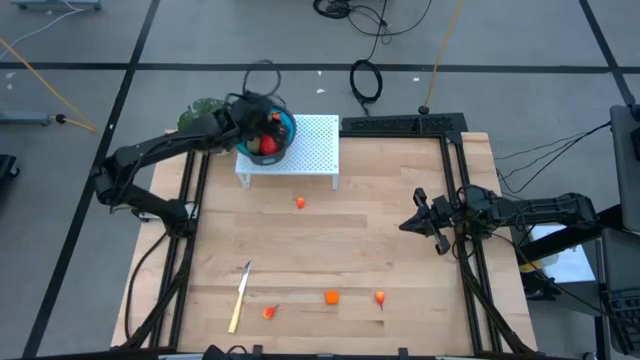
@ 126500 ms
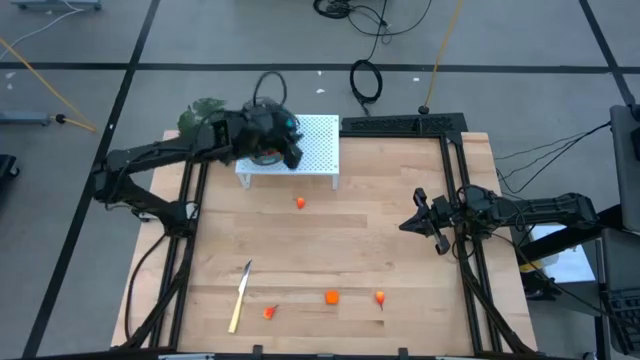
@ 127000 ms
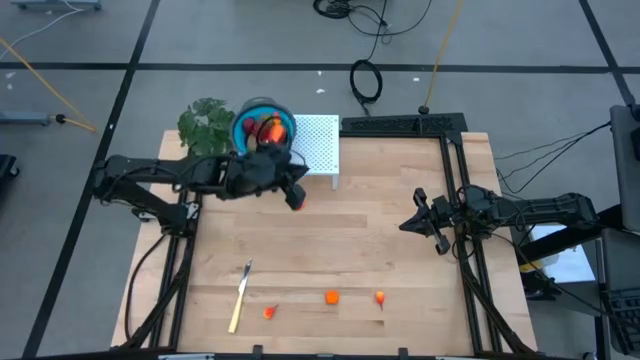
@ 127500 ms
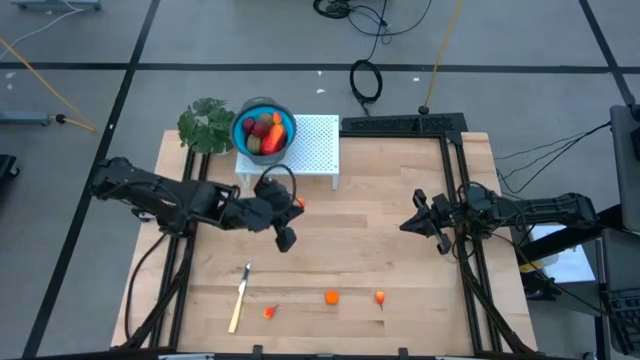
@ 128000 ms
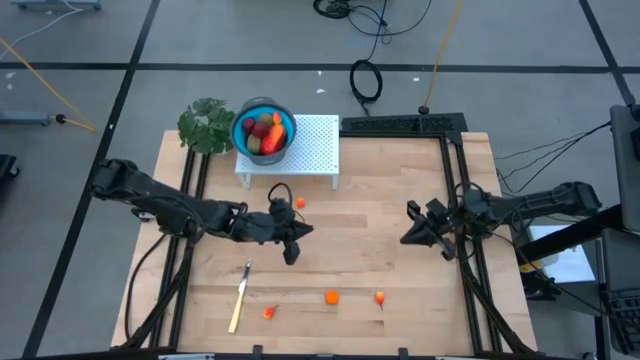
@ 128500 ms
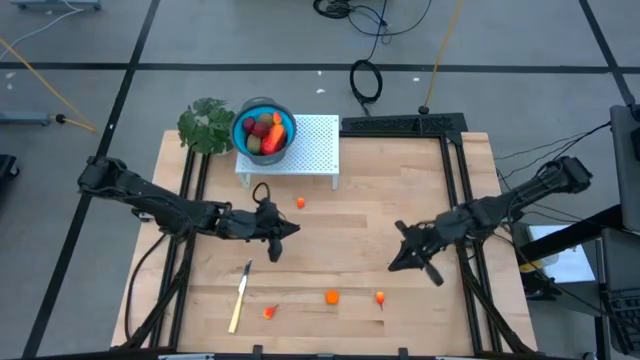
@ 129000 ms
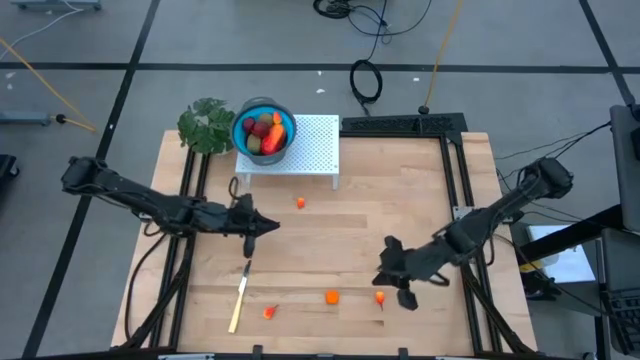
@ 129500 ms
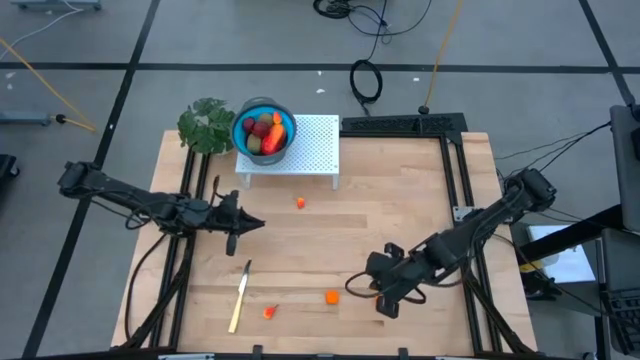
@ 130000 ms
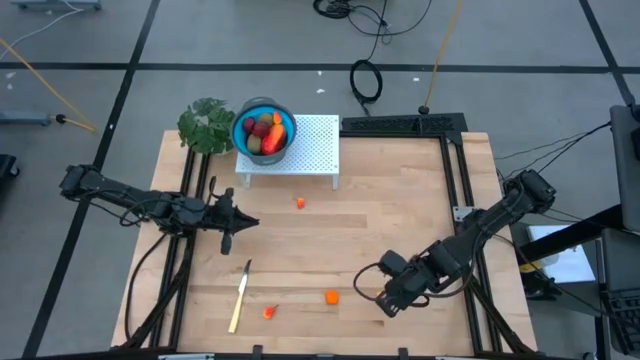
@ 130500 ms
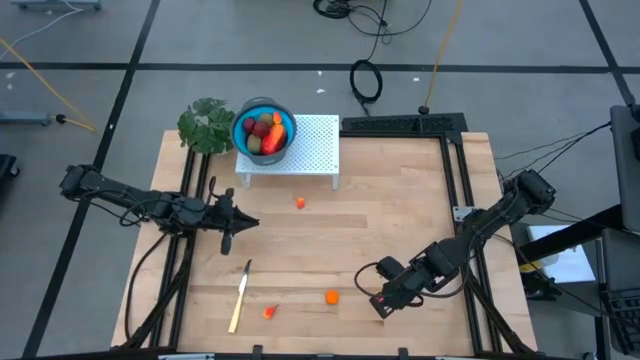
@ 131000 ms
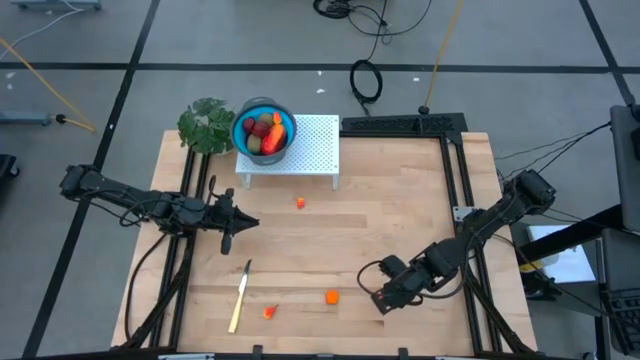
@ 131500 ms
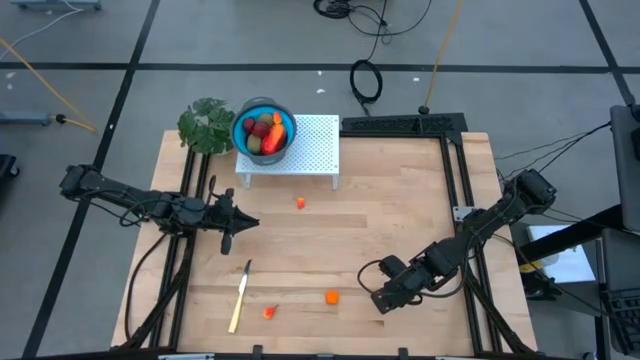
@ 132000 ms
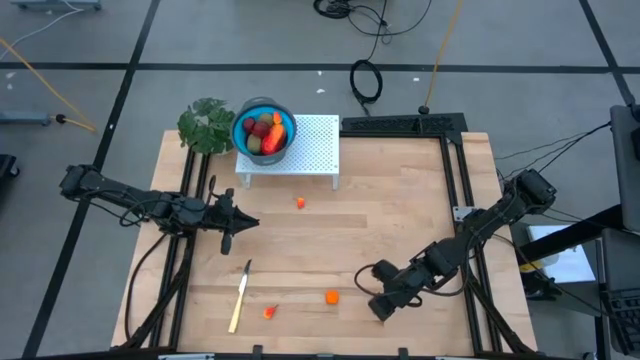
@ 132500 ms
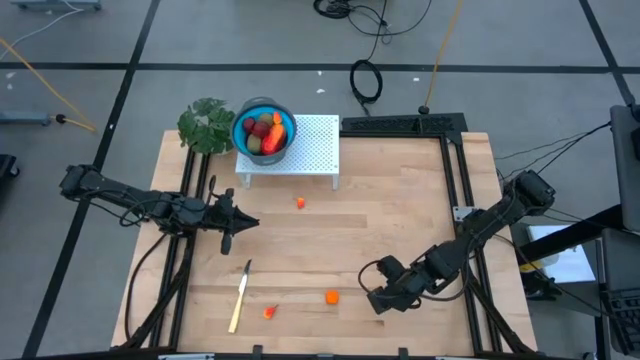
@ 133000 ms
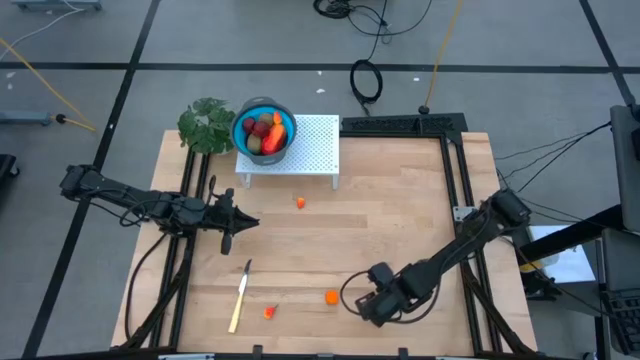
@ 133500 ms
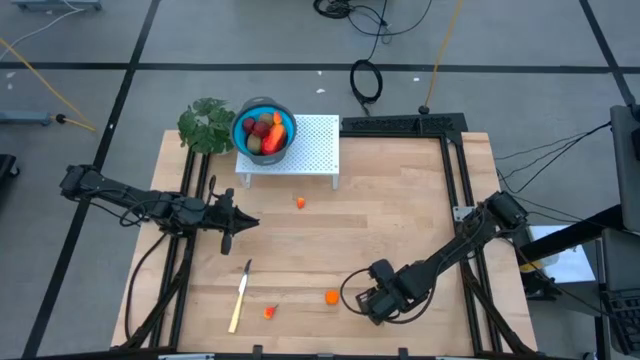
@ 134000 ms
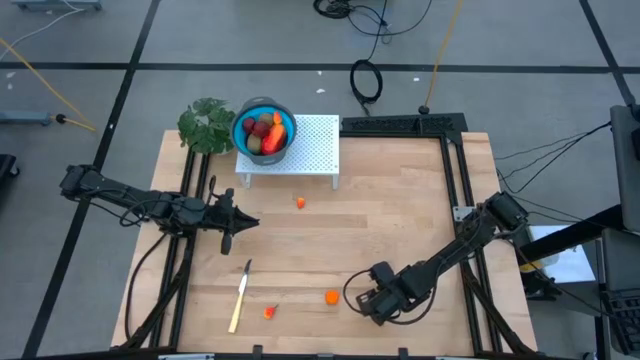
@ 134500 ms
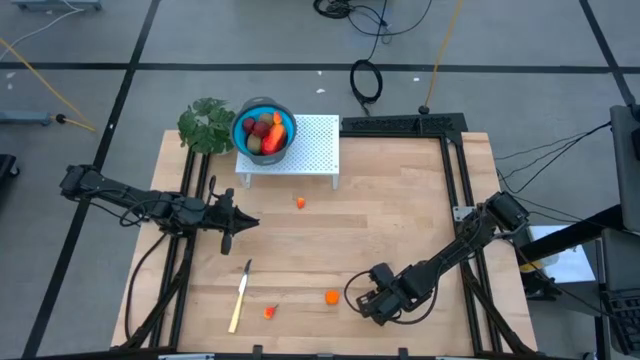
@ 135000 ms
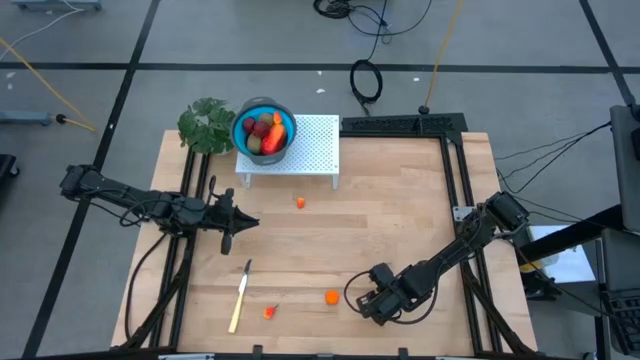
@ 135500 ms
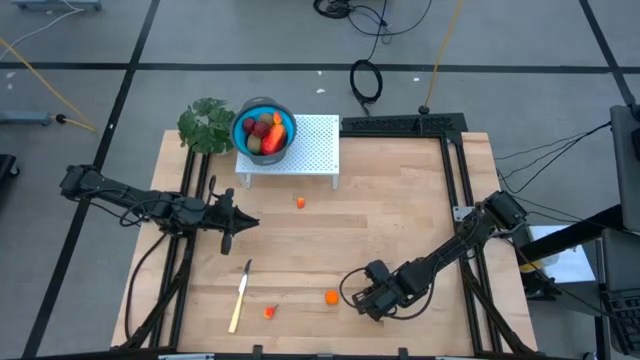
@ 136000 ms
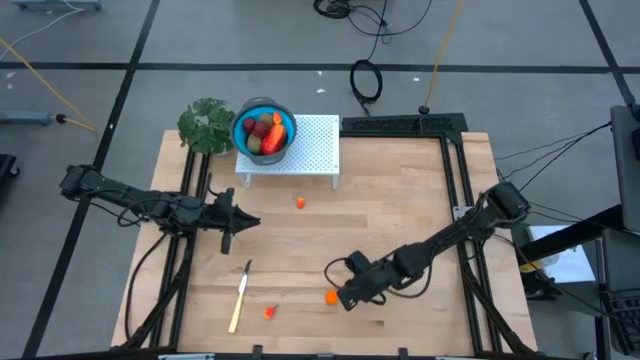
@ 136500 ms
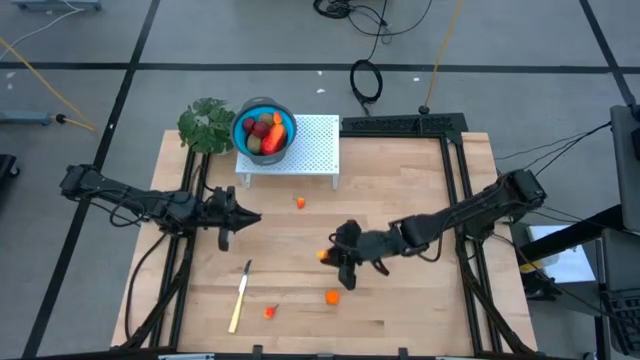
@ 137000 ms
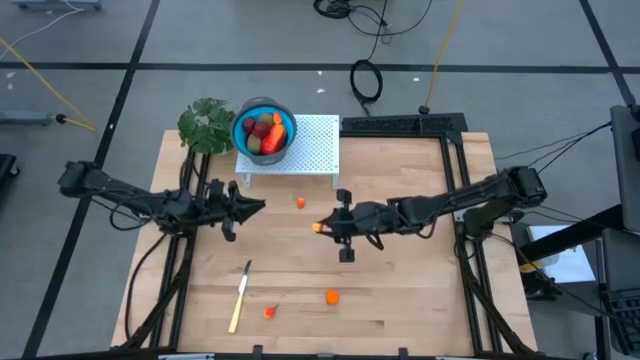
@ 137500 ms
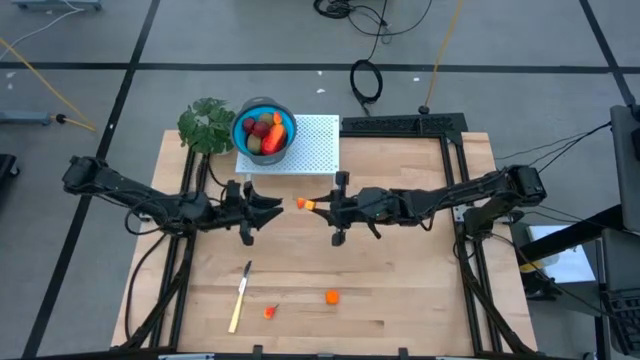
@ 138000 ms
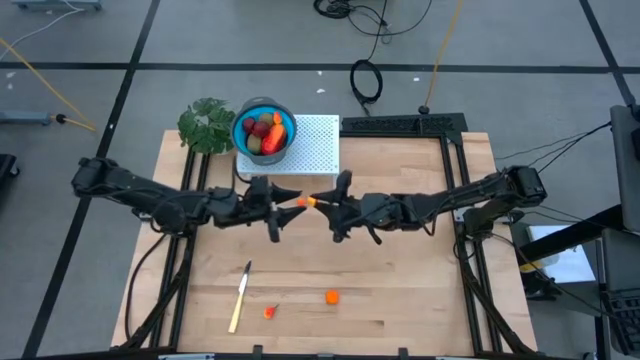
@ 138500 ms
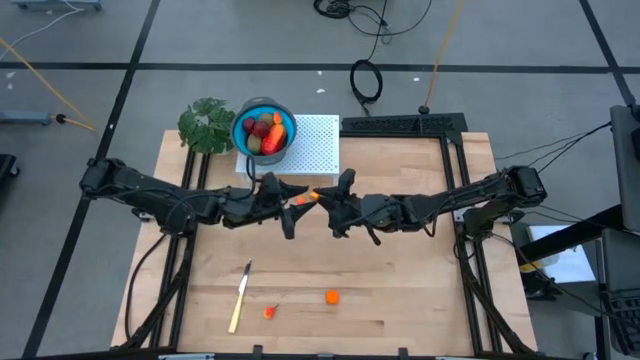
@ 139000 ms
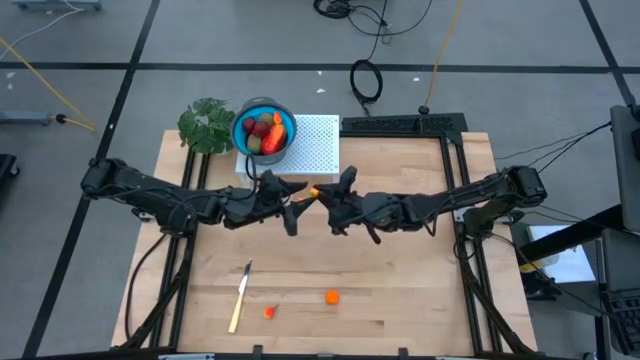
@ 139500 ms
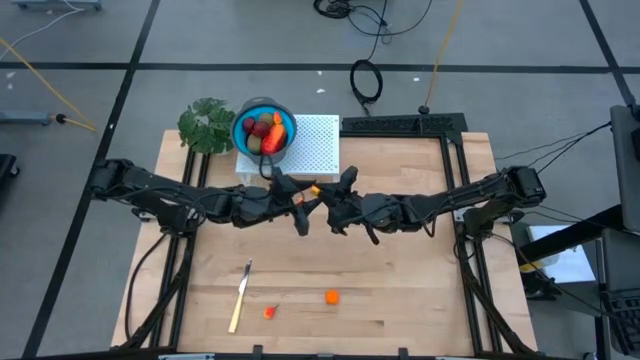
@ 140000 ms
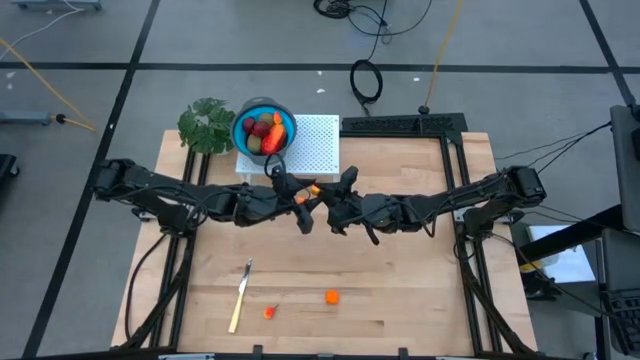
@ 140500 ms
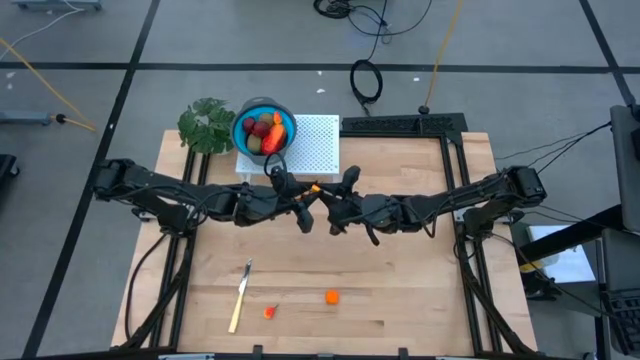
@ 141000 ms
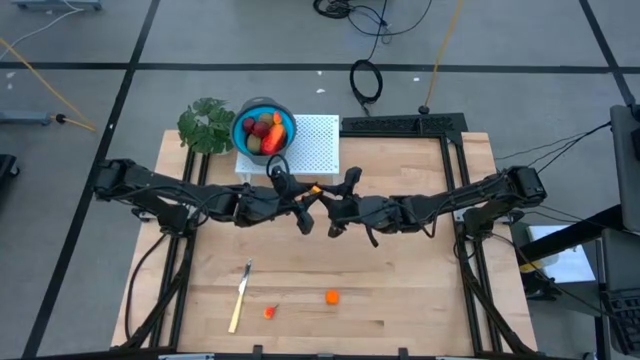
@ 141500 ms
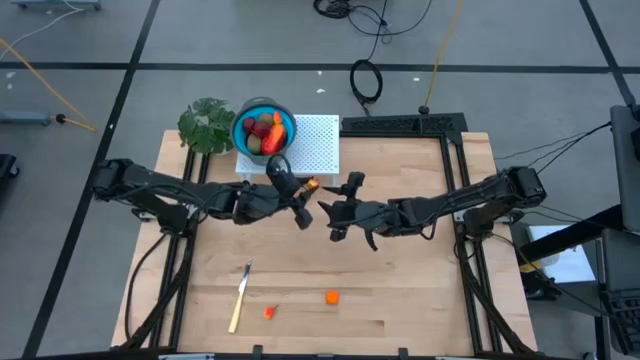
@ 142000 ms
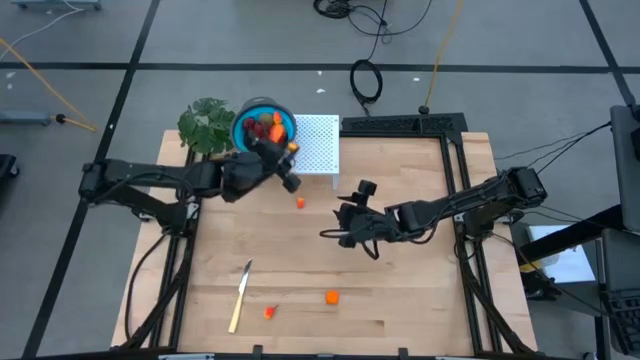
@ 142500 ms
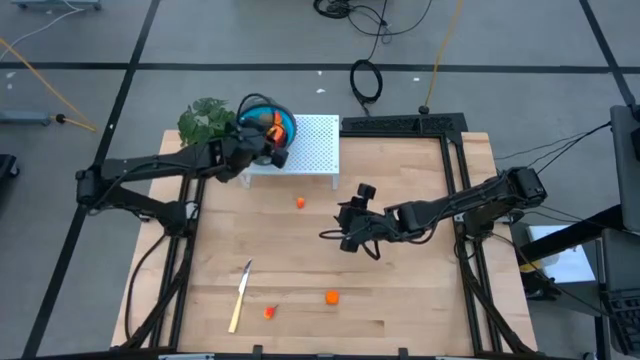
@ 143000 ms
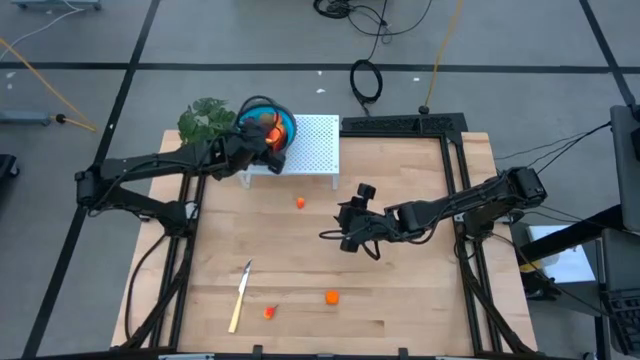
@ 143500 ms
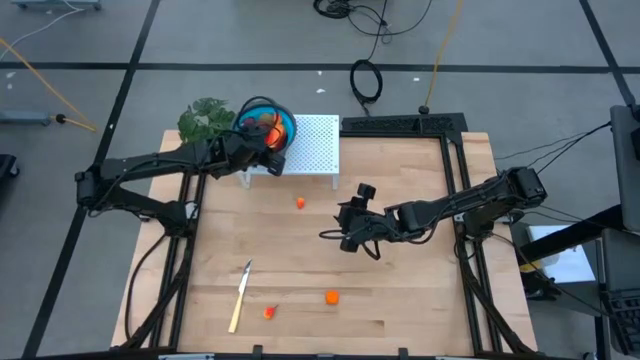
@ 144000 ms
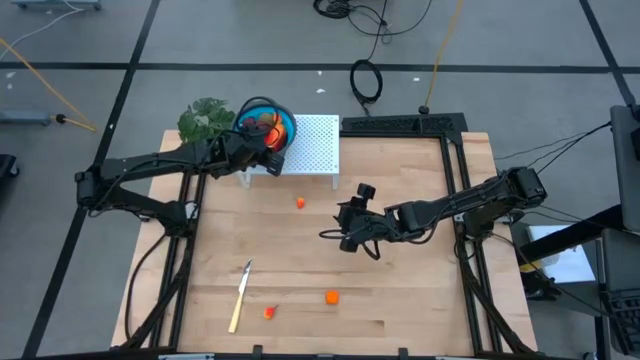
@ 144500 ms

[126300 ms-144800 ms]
Task: Pick & Place Fruit
Put the bottom right peach into the blue strainer bowl on the shelf on the shelf

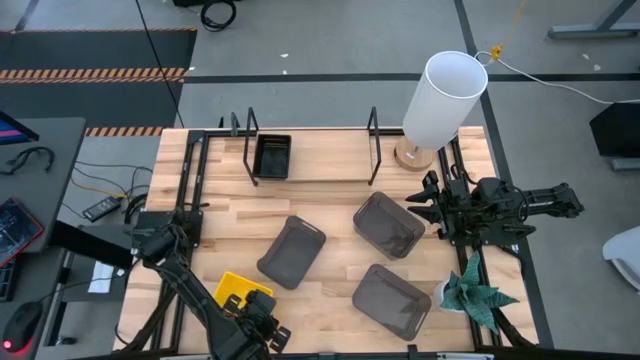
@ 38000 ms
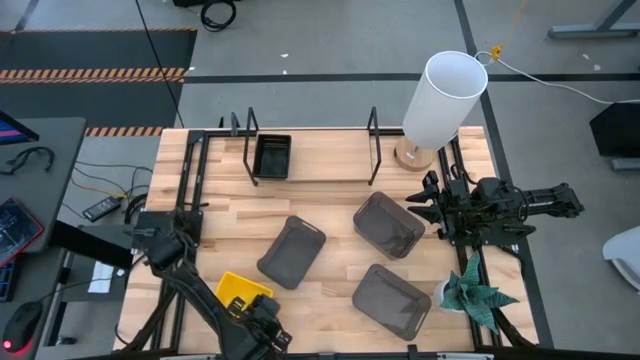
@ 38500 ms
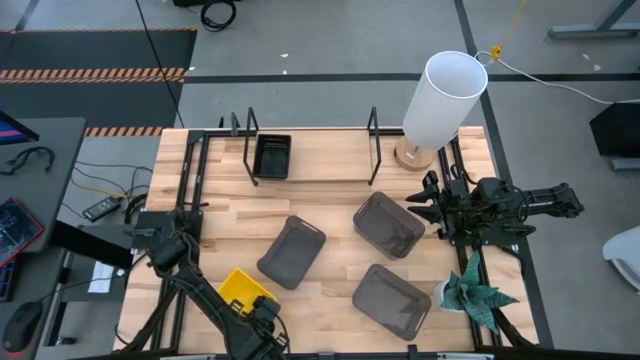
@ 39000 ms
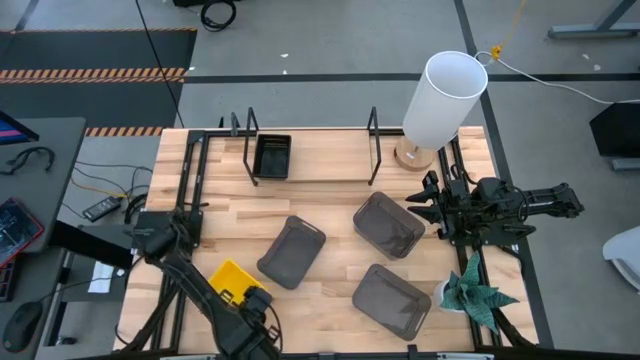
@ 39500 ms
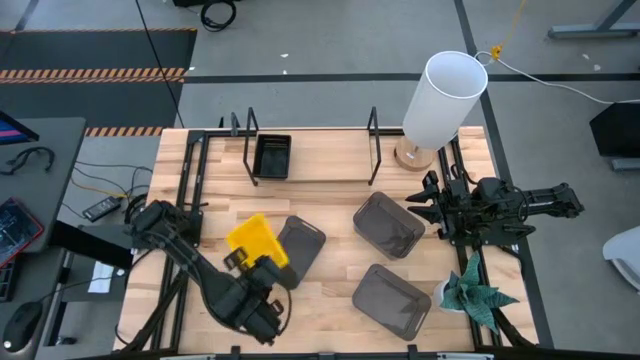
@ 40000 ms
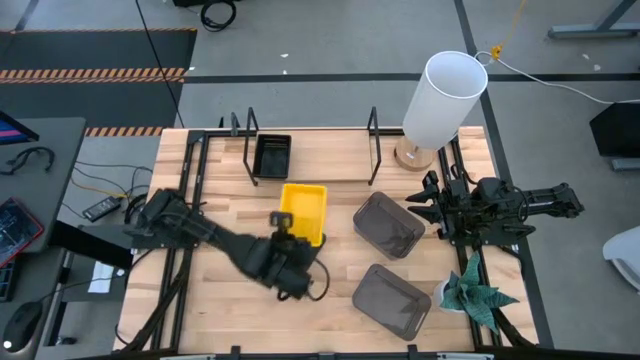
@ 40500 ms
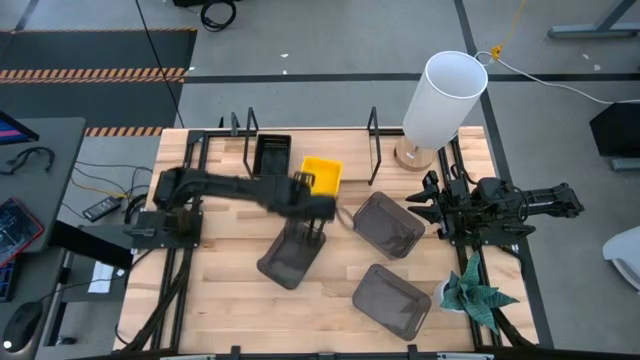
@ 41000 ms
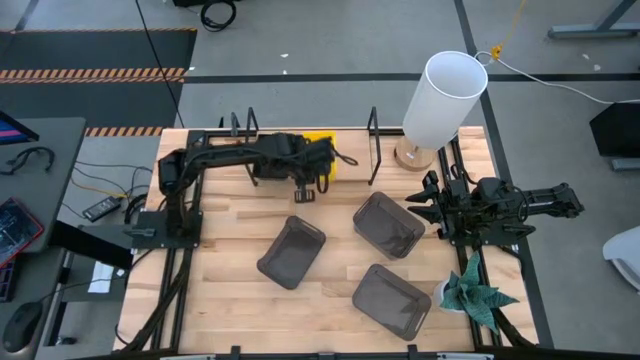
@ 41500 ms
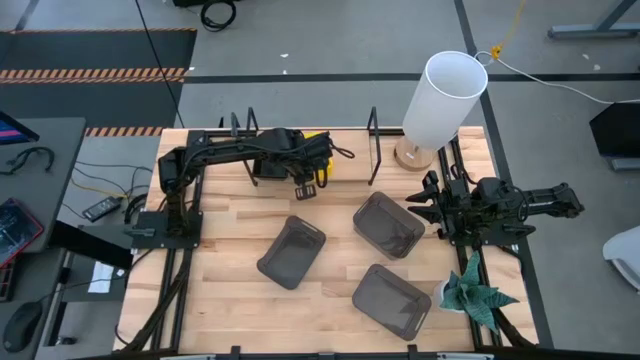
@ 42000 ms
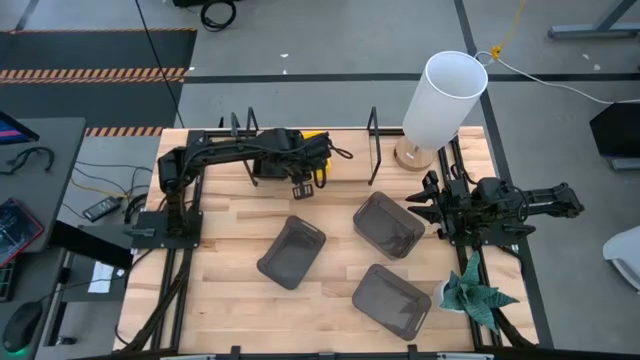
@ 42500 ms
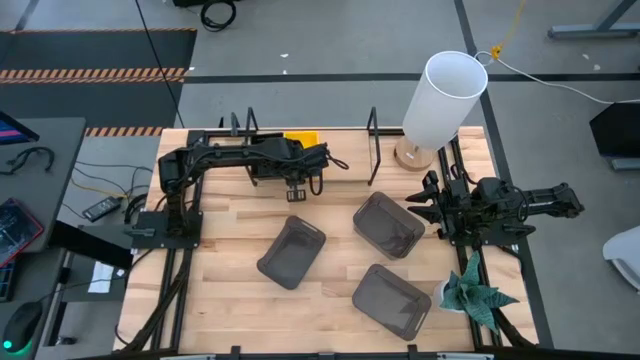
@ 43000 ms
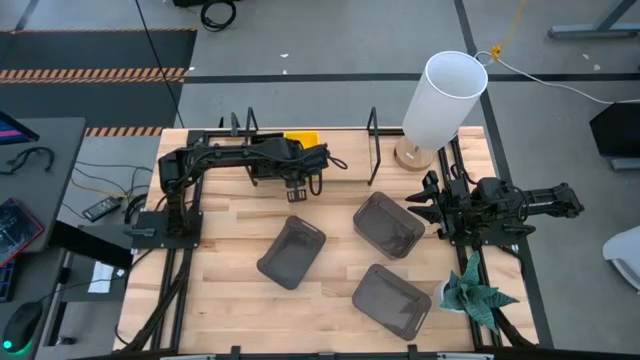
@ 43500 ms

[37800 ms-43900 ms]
Task: Stack baskets on shelf by color
Put the stack of yellow bins on the shelf
